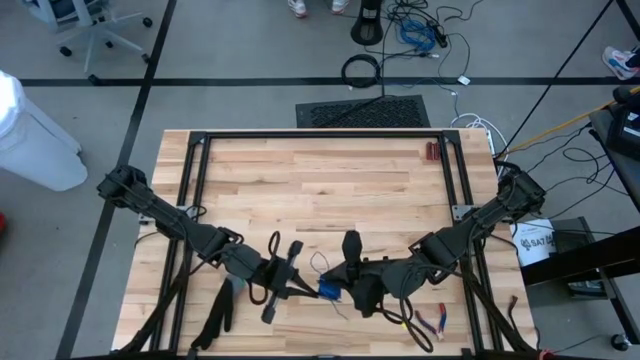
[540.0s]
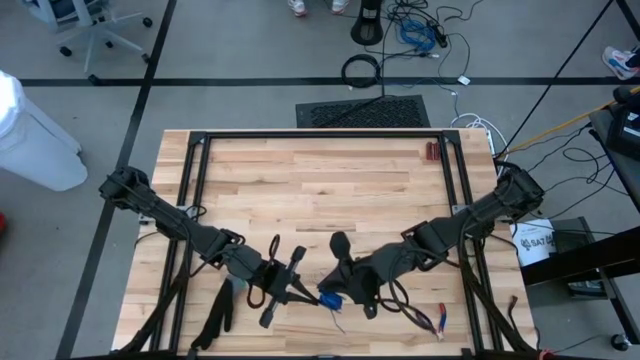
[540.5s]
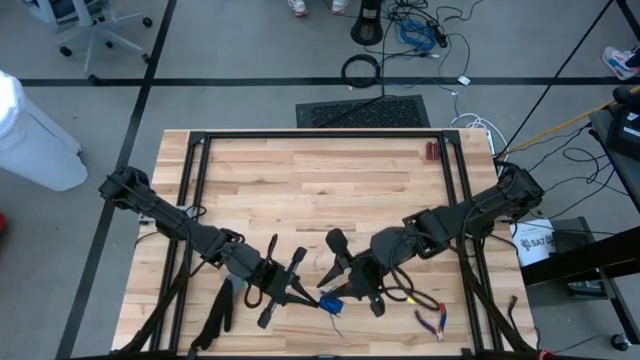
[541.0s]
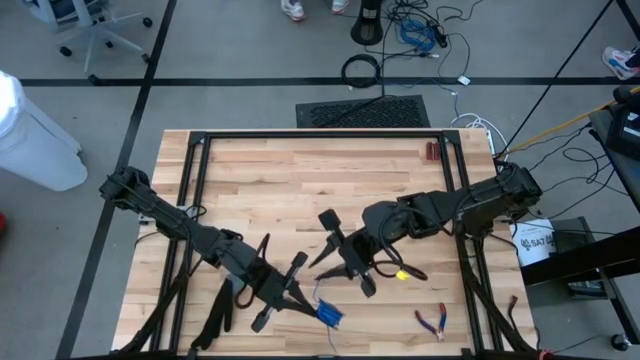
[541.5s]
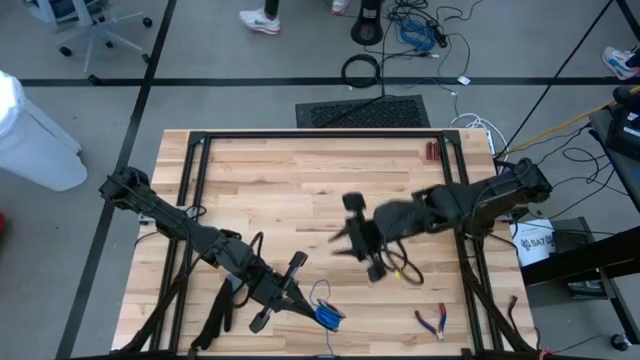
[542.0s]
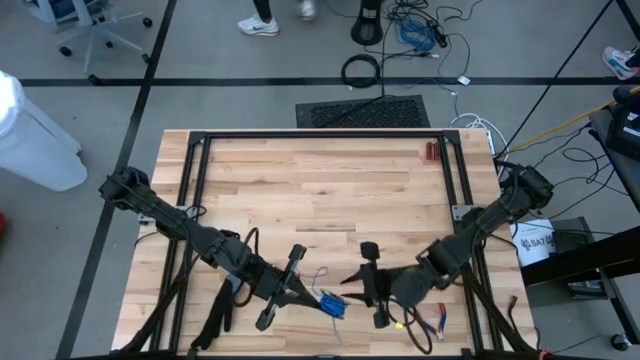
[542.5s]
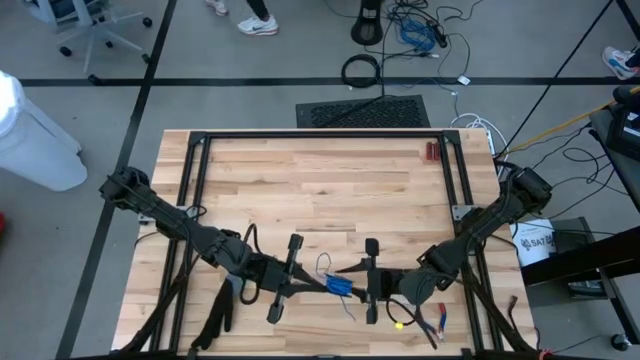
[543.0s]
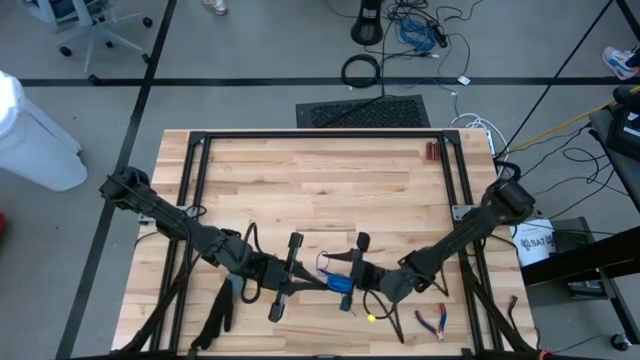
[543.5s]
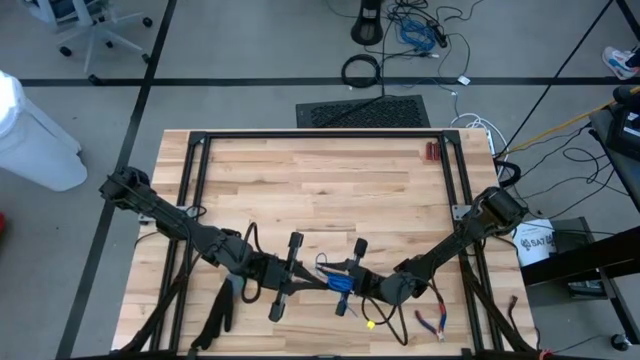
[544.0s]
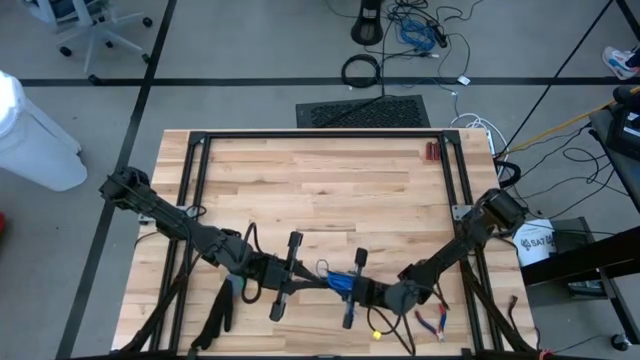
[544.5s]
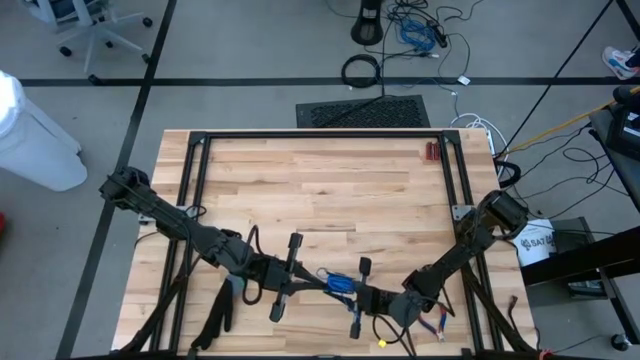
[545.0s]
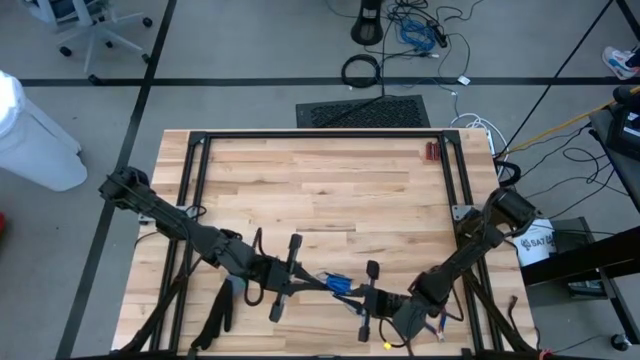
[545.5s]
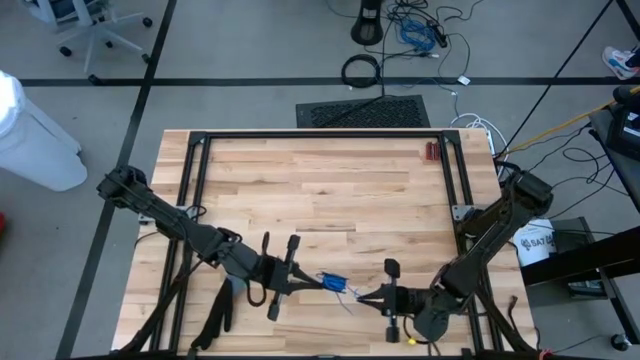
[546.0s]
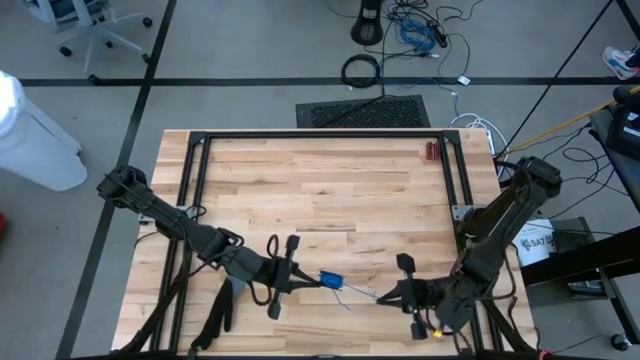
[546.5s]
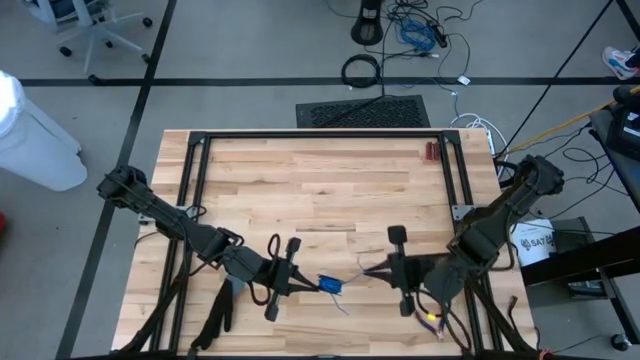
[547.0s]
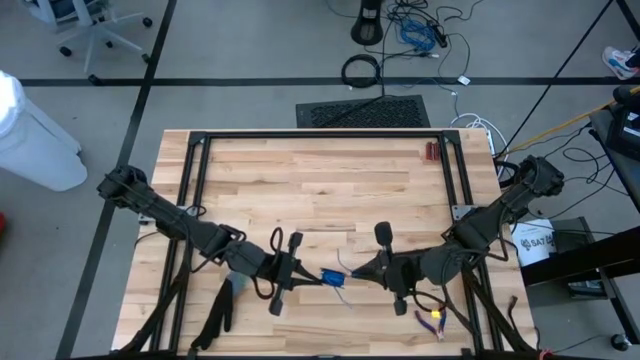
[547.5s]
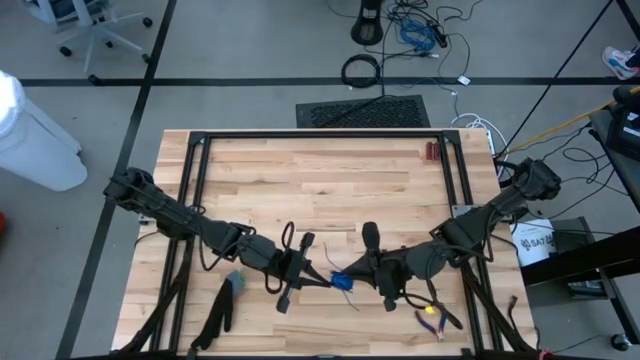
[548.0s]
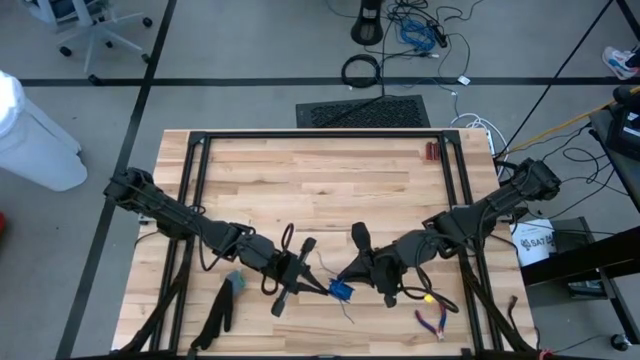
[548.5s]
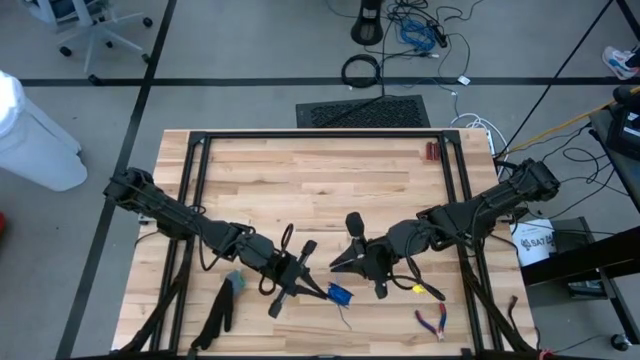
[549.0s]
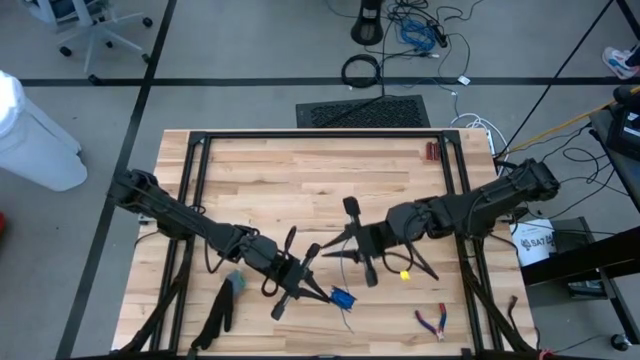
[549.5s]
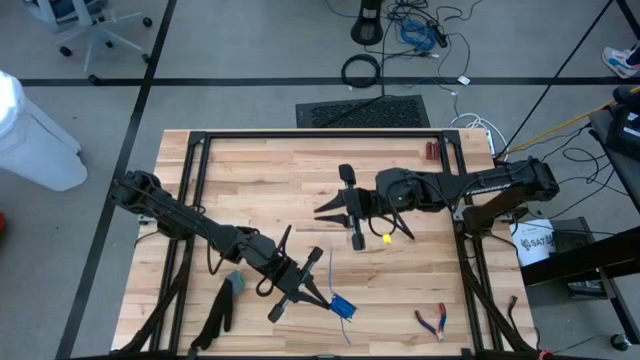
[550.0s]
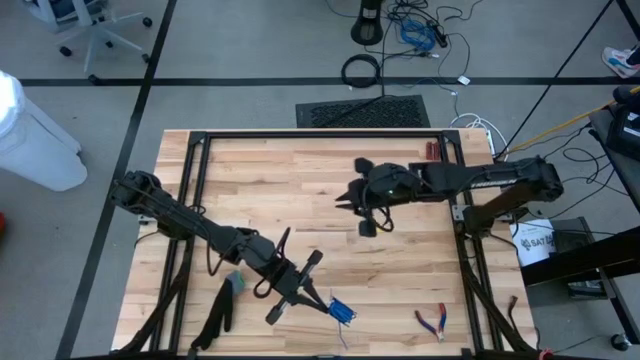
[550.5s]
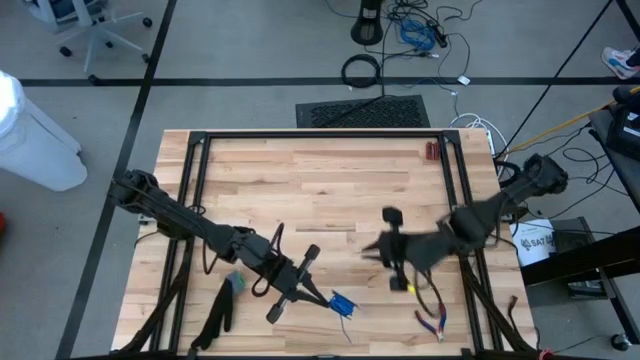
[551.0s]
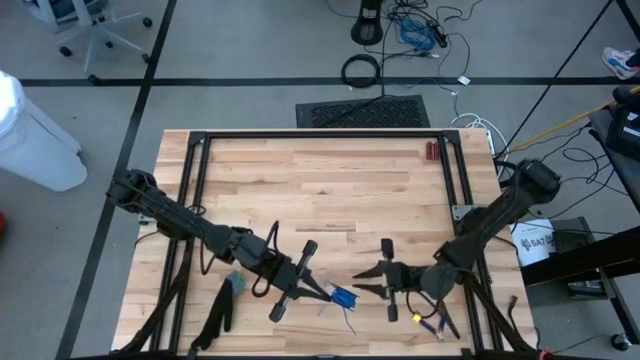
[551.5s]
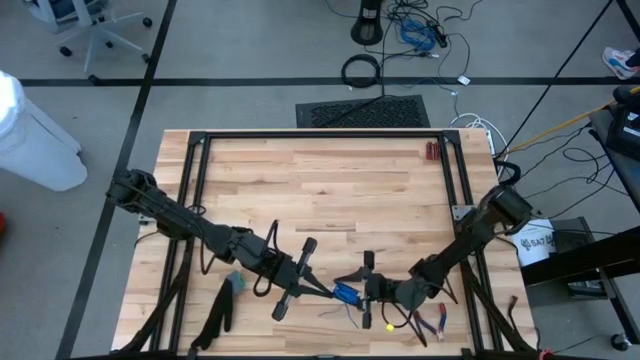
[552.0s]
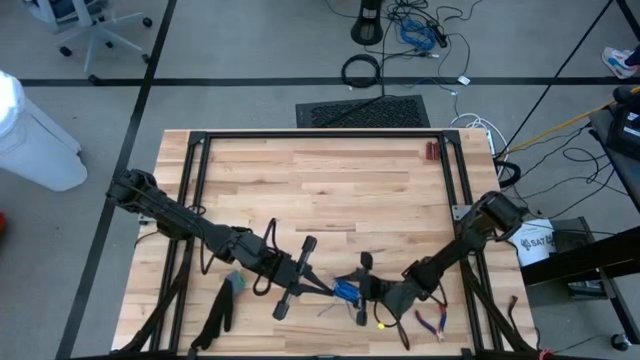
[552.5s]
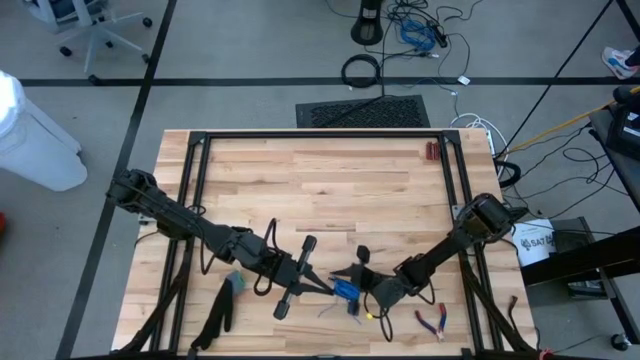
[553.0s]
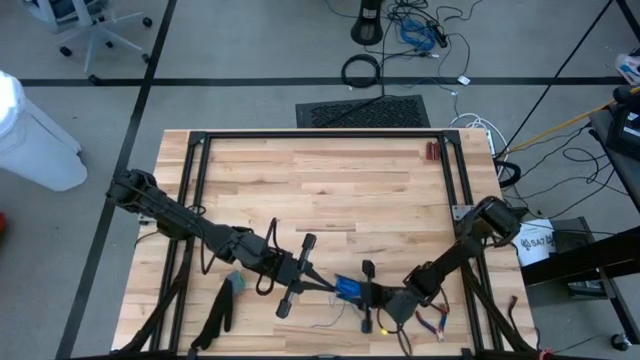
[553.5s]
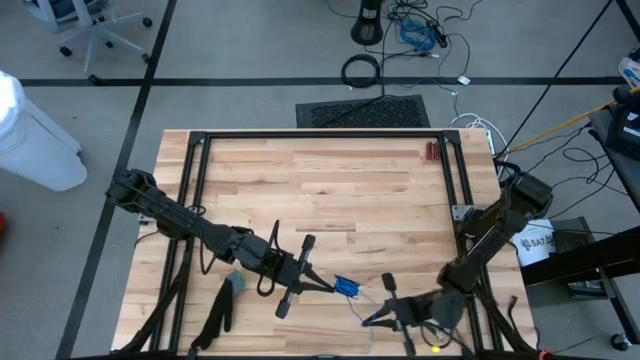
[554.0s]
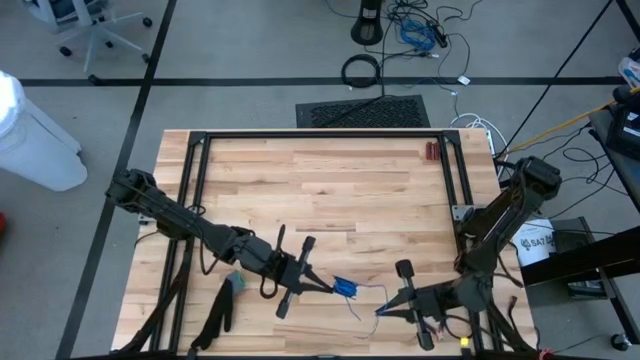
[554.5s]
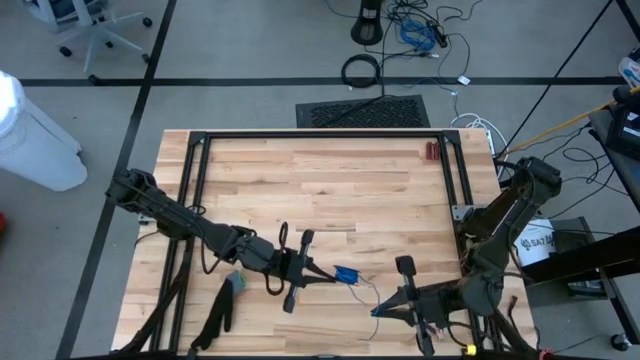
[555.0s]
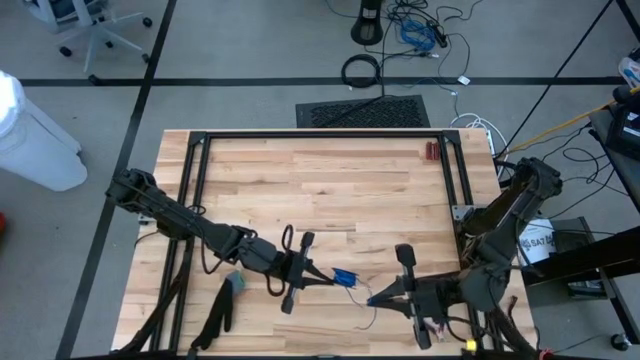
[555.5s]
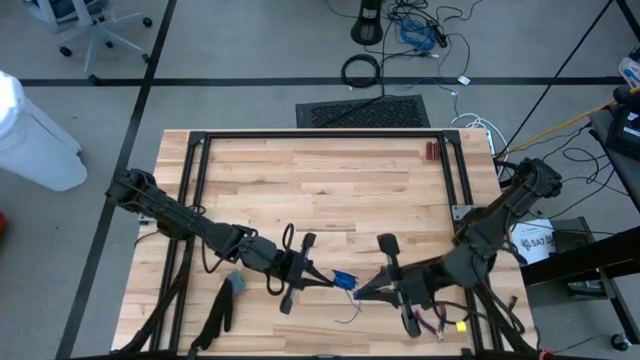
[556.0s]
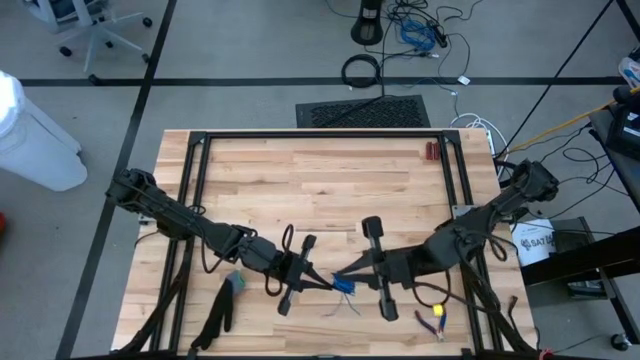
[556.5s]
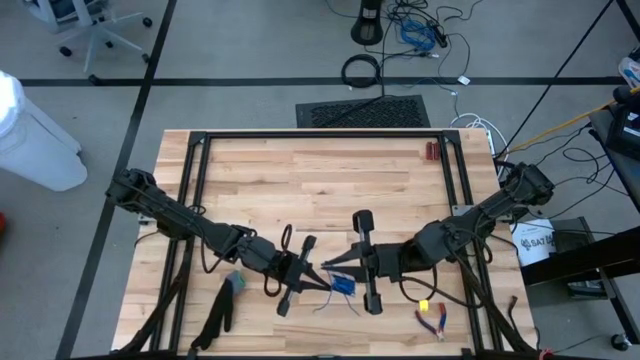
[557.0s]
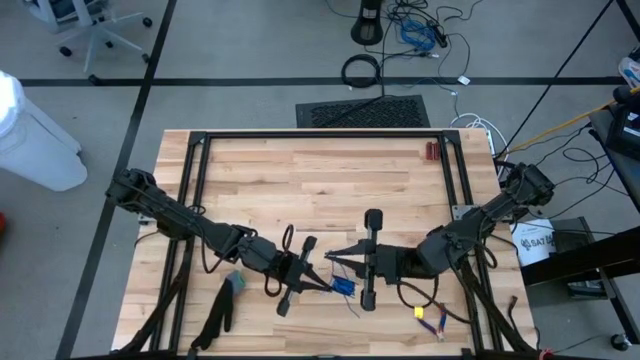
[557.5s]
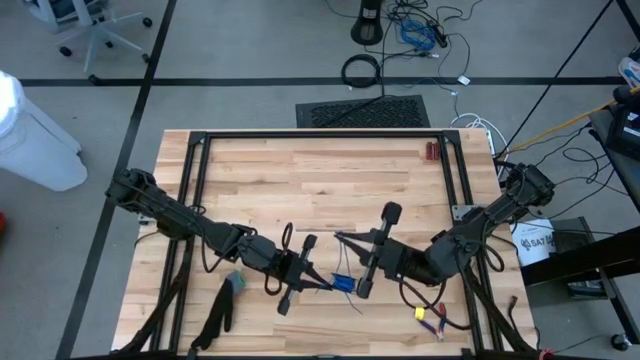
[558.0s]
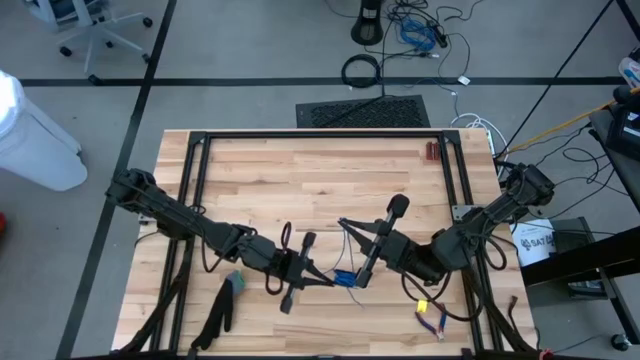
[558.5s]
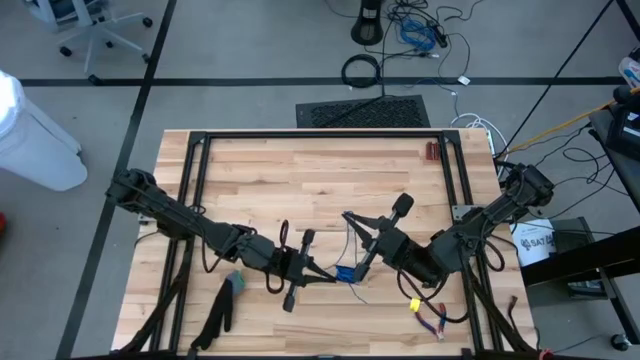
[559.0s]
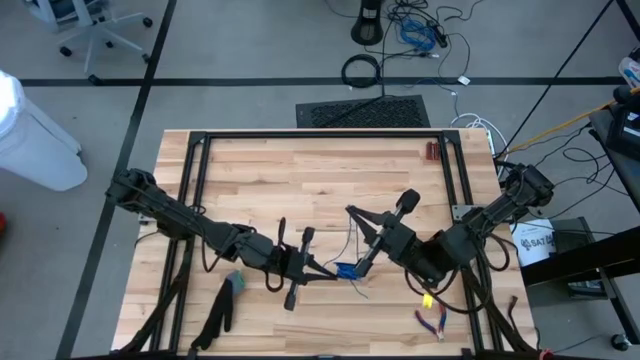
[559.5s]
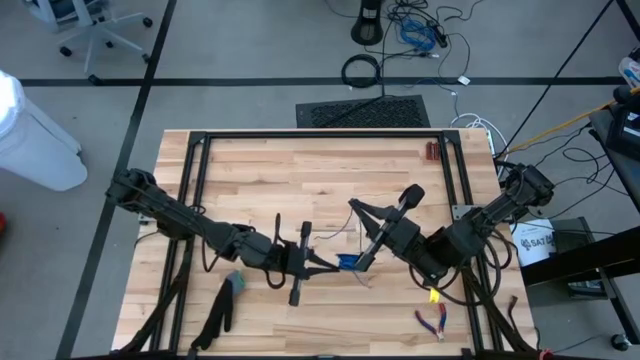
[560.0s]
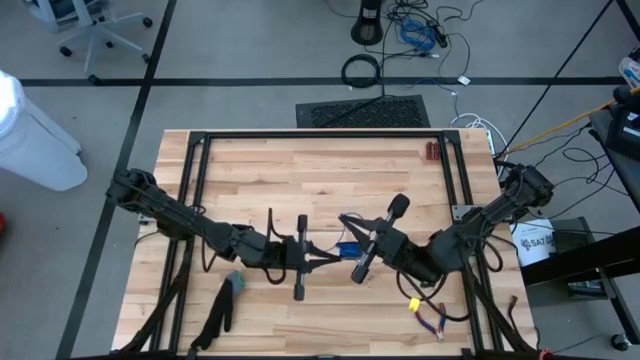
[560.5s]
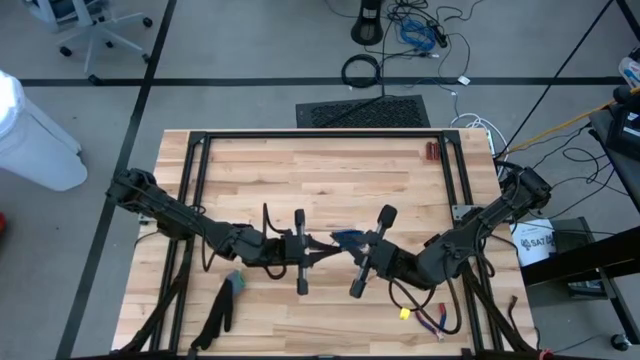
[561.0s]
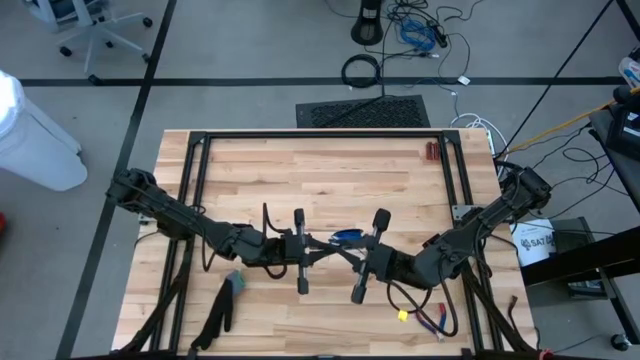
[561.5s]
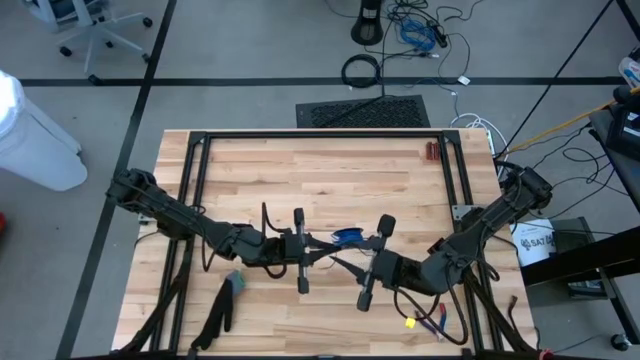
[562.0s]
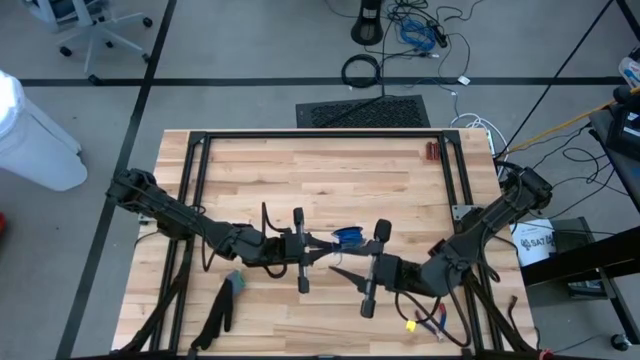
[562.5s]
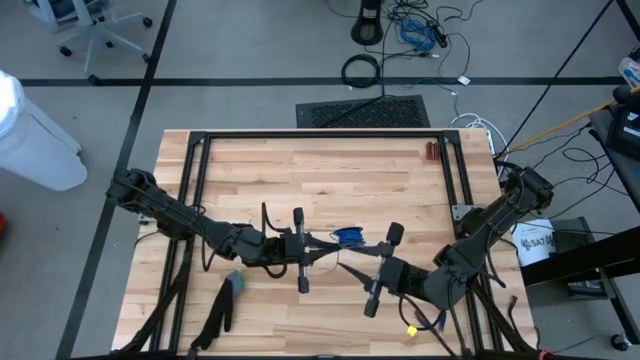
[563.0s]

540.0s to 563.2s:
Task: Coil cords
Coil the blue wire onto the black spool
